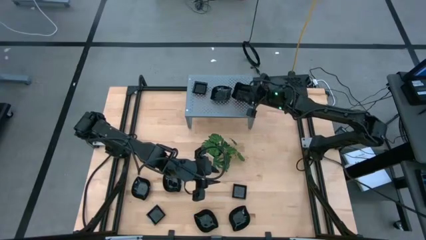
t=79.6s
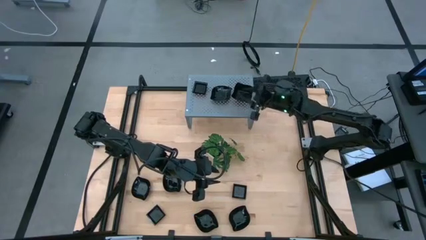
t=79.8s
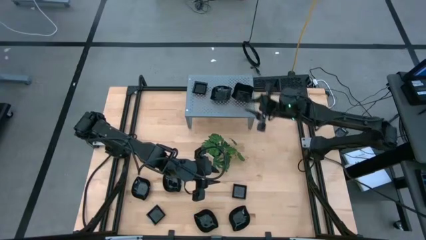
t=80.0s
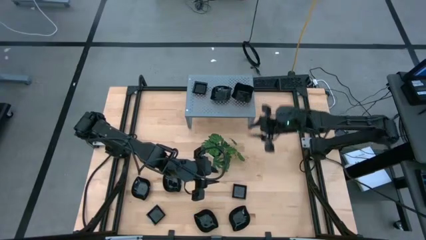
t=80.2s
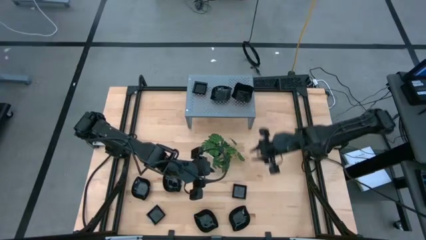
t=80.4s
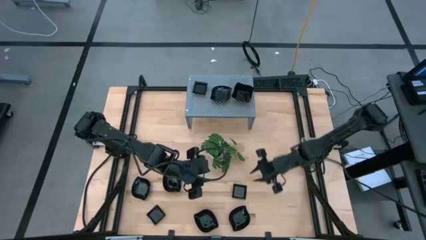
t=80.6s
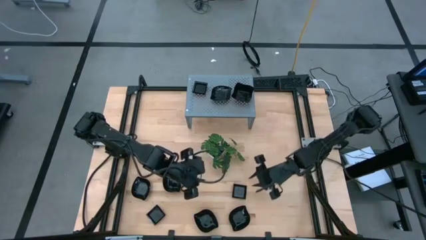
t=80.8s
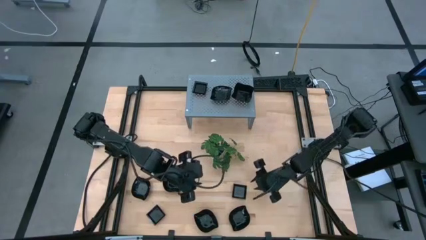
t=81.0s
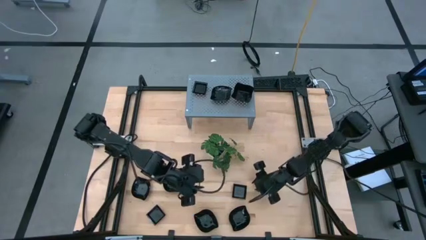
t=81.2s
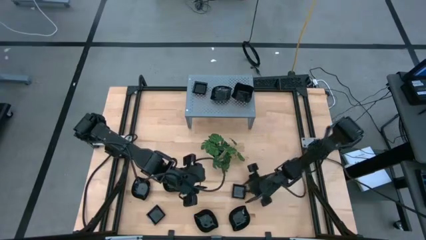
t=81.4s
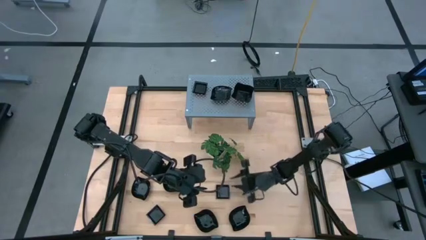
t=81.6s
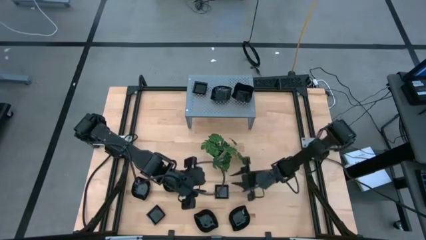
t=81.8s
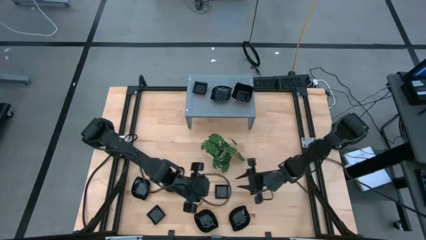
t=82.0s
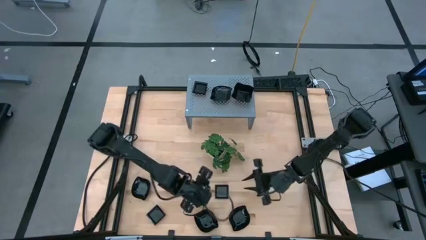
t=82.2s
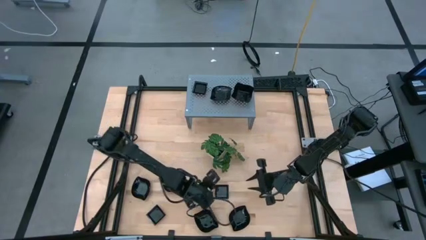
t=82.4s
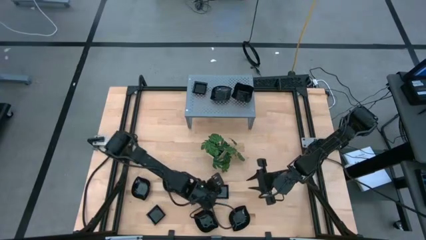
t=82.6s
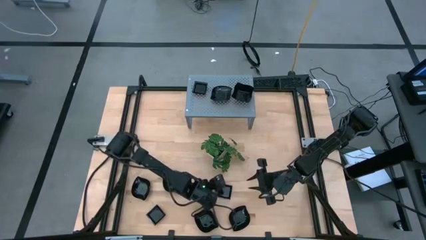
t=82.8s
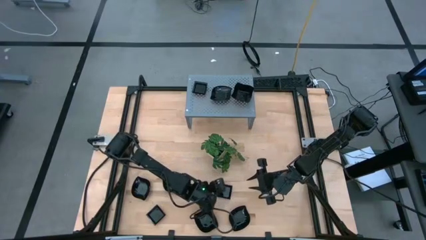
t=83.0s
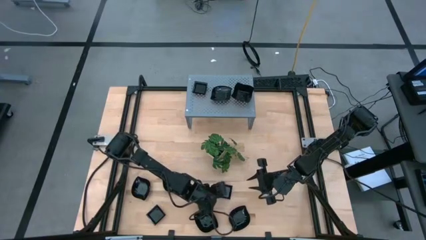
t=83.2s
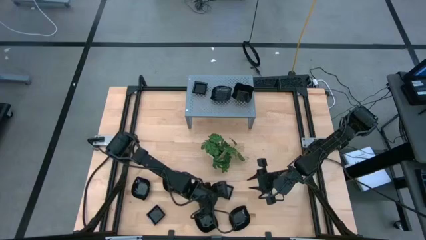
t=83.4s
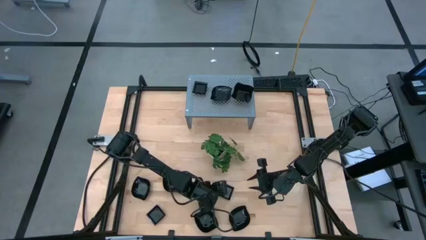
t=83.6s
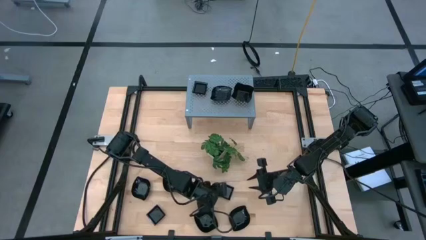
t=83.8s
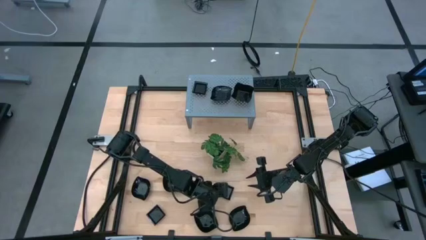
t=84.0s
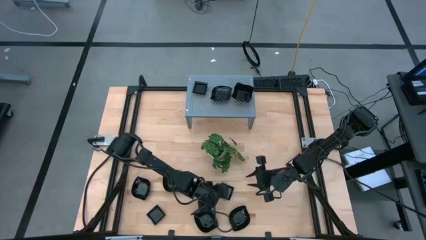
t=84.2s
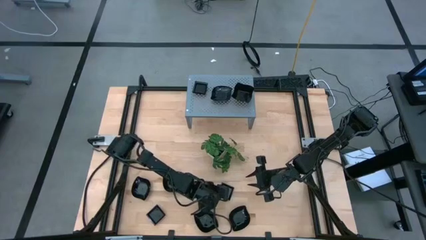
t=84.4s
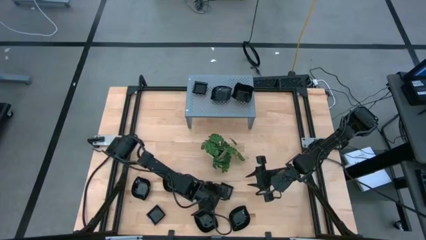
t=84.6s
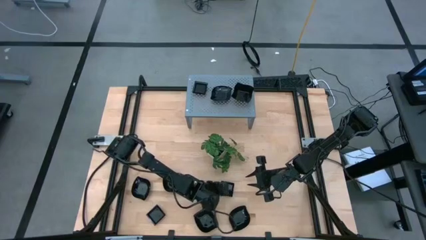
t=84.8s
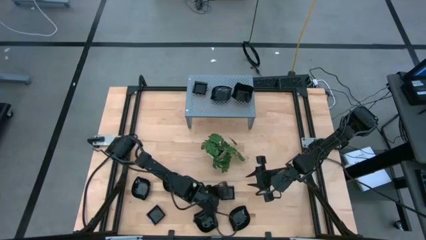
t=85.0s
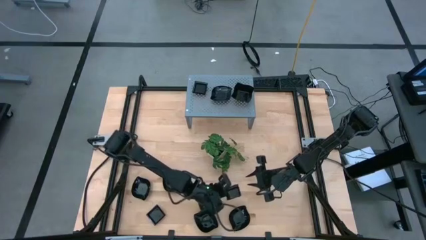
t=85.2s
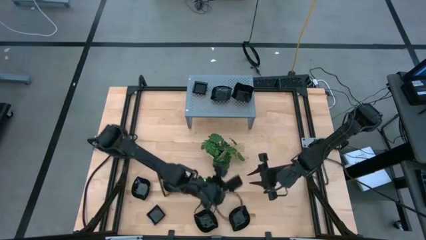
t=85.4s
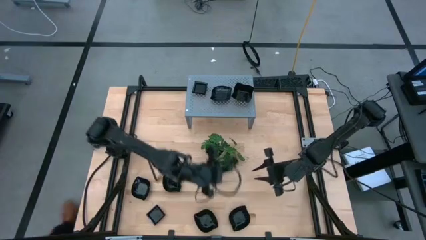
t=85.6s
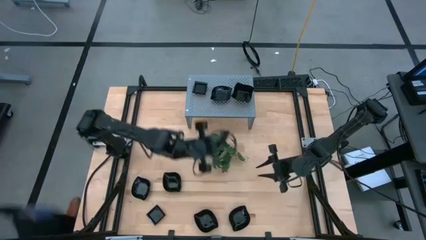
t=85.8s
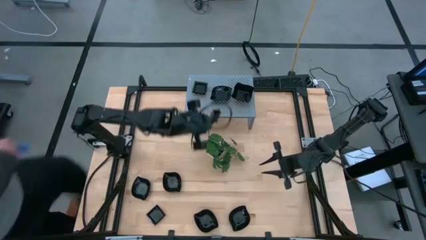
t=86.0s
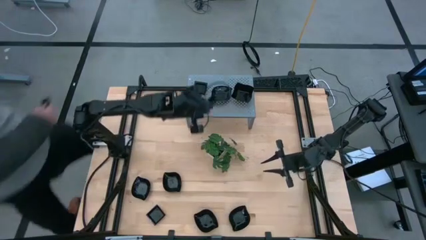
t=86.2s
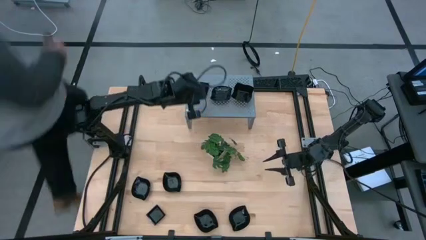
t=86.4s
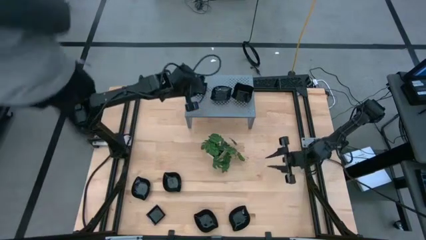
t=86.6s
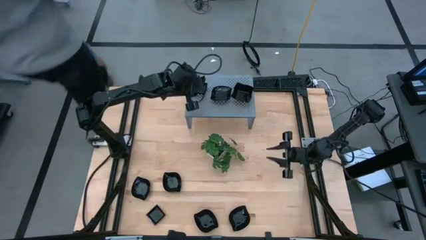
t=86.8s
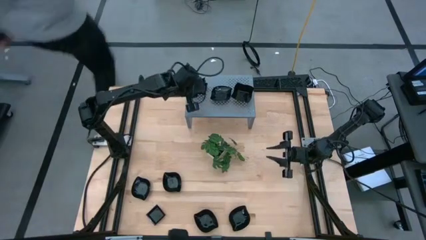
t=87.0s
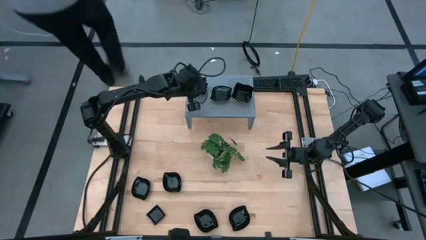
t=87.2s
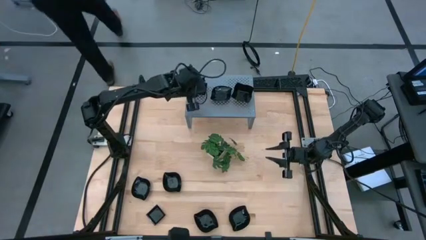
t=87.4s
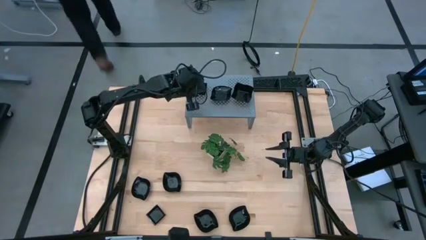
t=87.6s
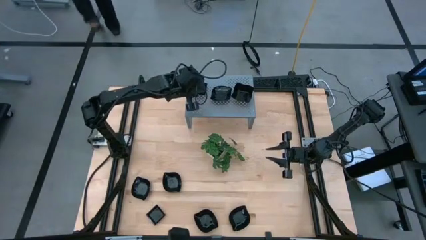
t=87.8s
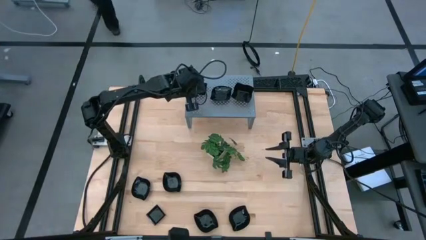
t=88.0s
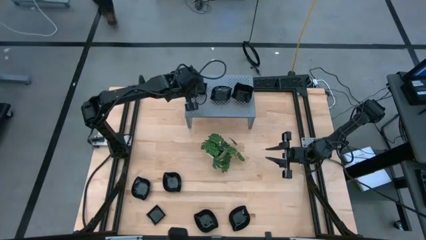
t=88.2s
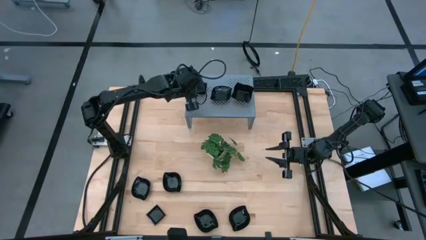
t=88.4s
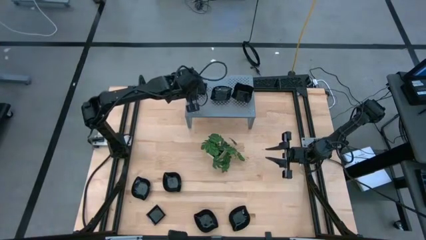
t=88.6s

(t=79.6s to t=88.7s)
Task: Pick & Place Mini shaped plates
Stack the square black bowl on top of the other square black bowls on the shelf

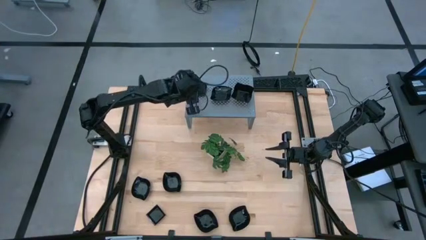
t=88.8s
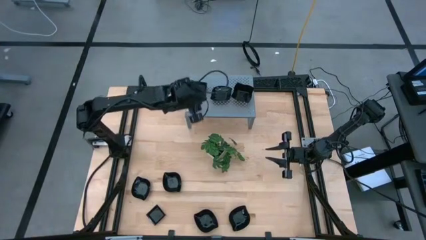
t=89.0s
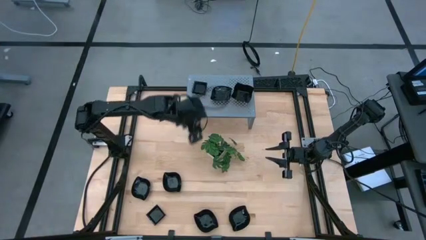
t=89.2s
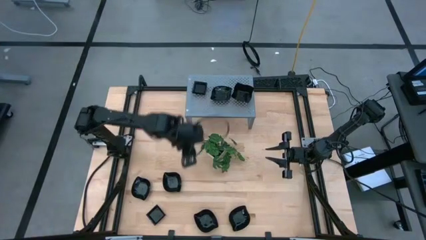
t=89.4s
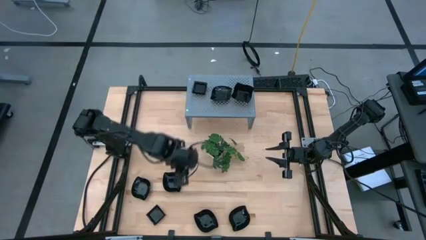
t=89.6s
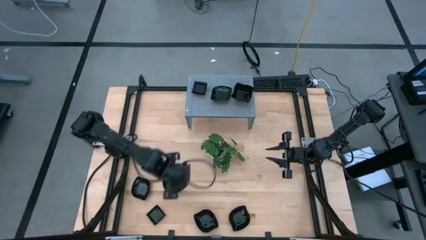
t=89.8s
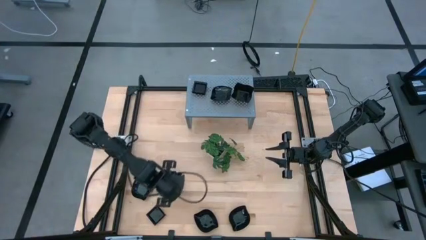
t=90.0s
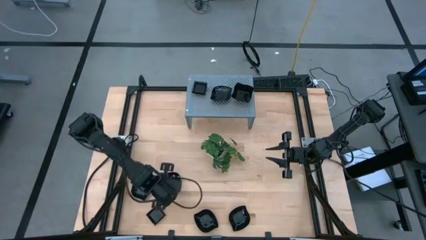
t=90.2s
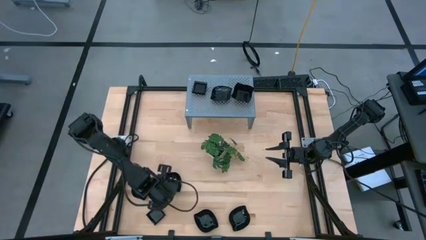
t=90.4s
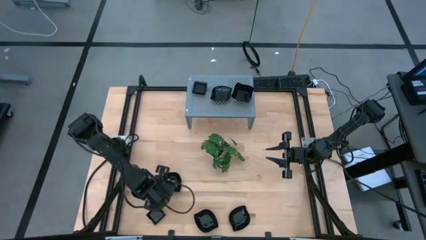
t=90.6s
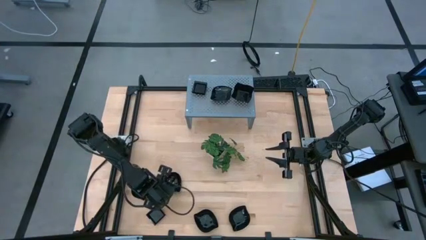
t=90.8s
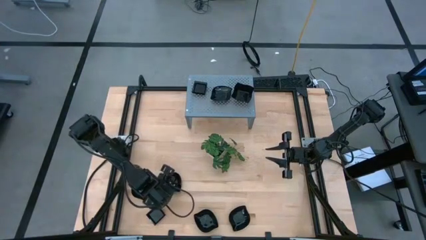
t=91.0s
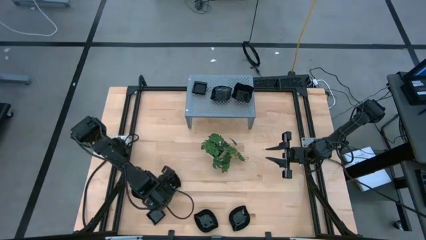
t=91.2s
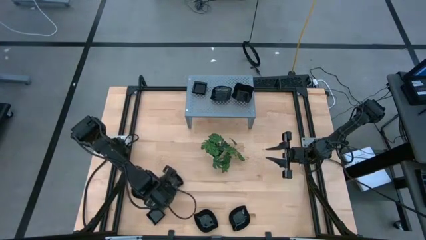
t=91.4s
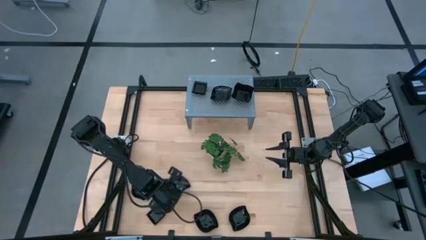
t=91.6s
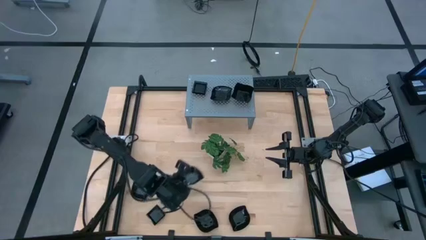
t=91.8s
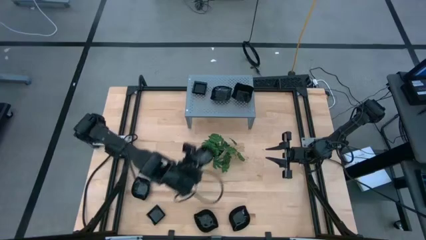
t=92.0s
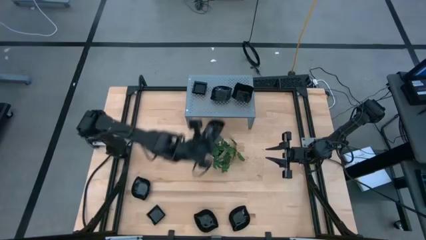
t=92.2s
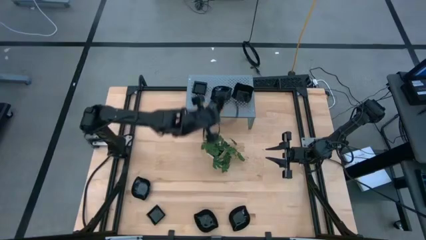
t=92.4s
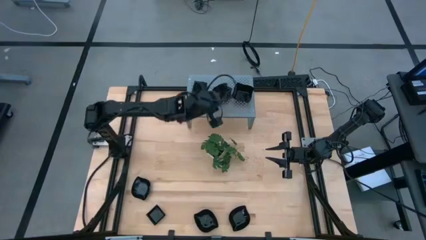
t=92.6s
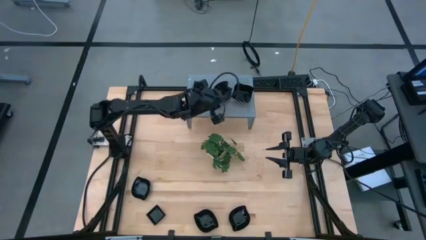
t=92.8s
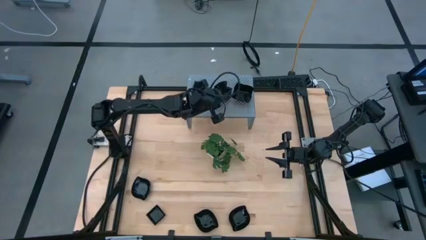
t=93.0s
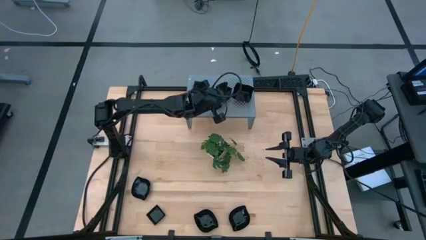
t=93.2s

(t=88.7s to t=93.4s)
Stack the leaf-shaped black bowl on top of the other leaf-shaped black bowl on the shelf

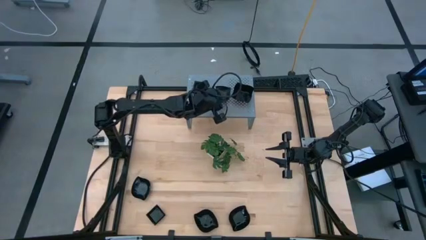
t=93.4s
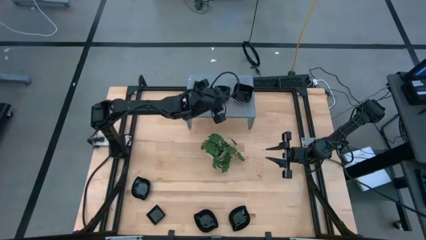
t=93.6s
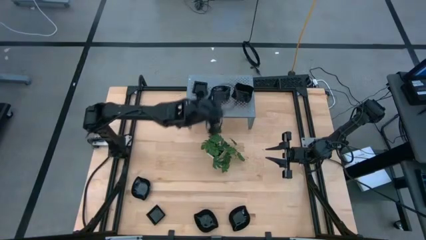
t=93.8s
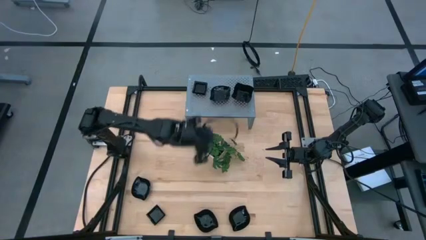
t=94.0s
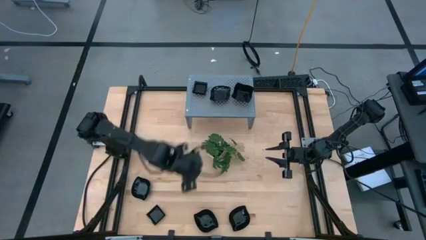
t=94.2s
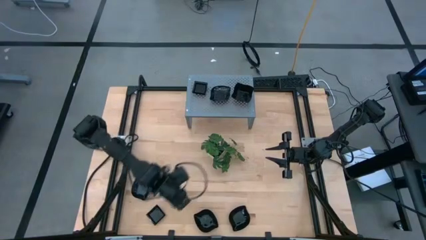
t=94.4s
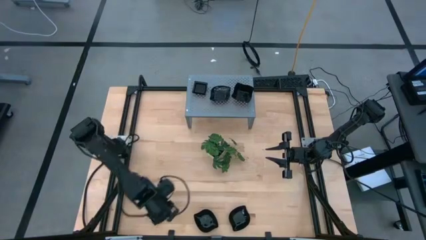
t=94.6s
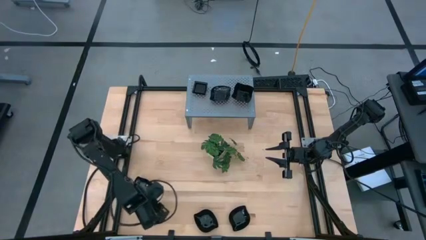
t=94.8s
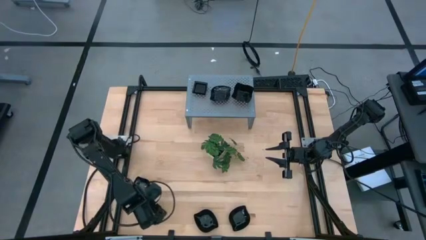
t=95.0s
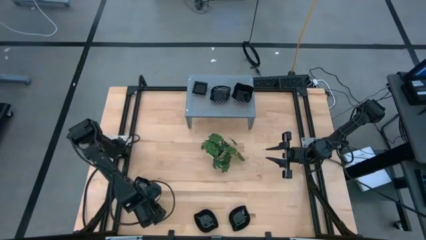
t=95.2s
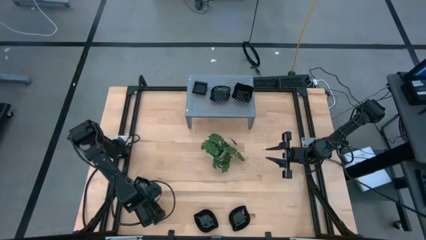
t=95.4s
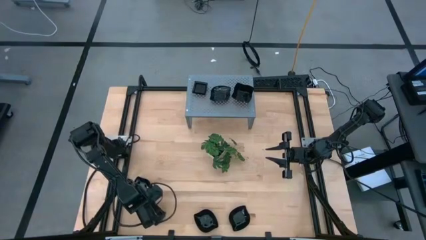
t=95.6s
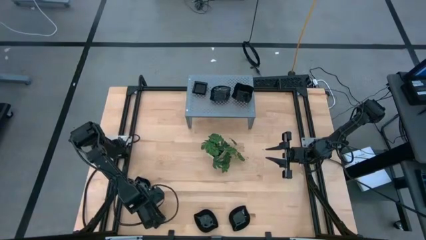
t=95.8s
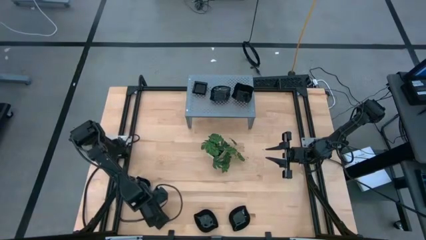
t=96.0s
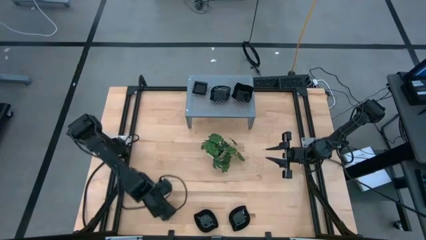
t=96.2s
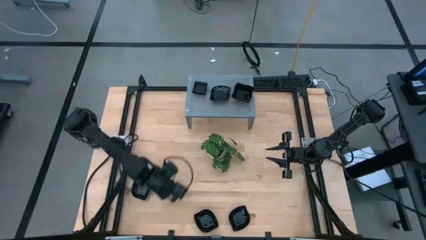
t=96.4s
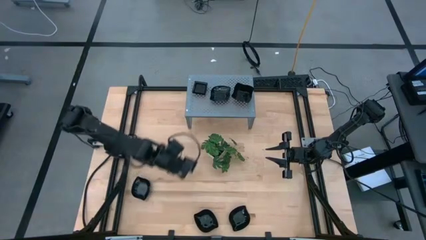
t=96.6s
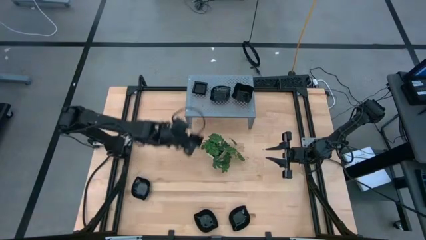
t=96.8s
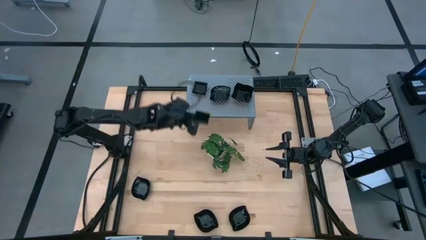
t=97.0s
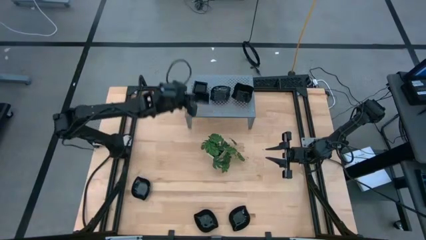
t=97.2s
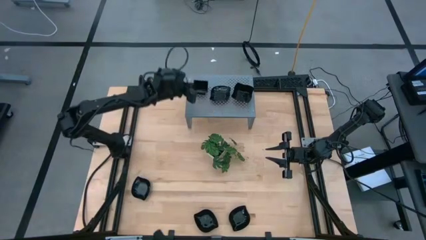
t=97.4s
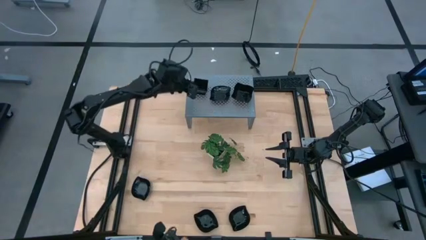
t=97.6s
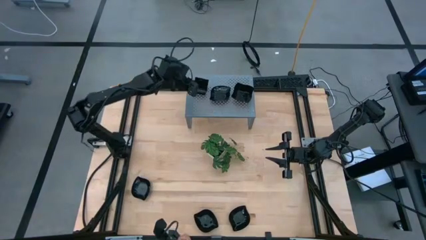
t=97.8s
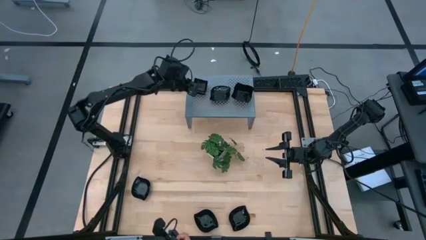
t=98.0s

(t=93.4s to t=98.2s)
Stack the square black bowl on top of the other square black bowls on the shelf
